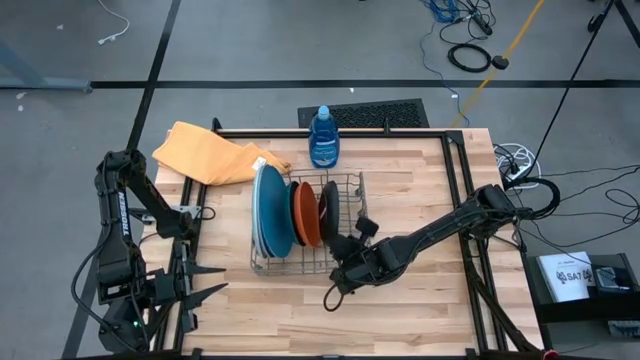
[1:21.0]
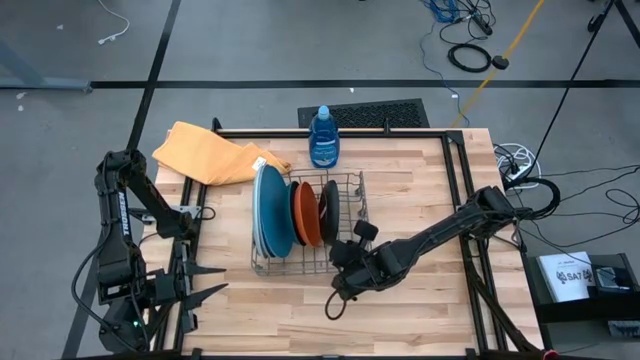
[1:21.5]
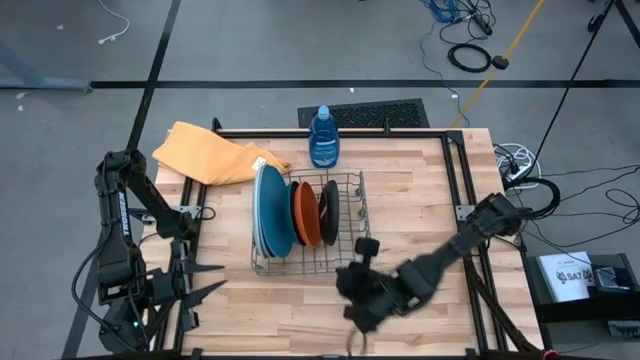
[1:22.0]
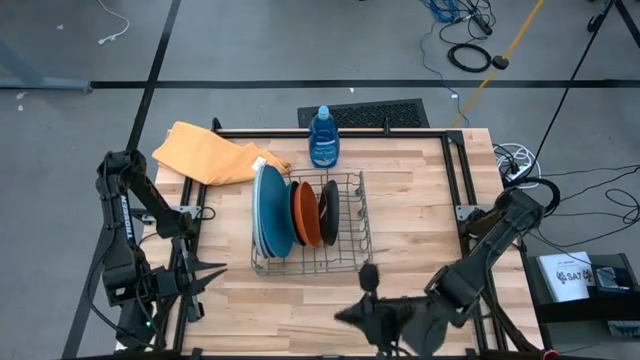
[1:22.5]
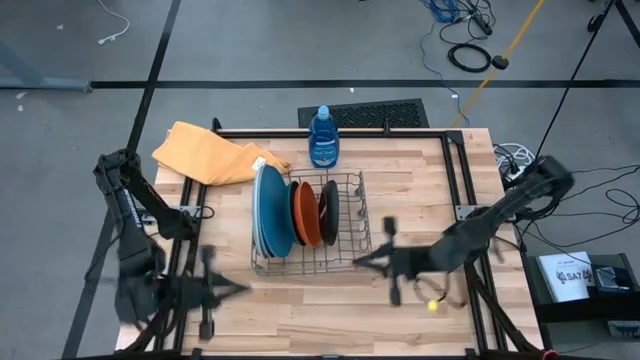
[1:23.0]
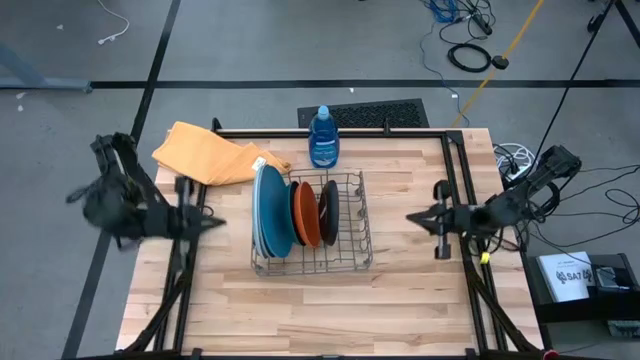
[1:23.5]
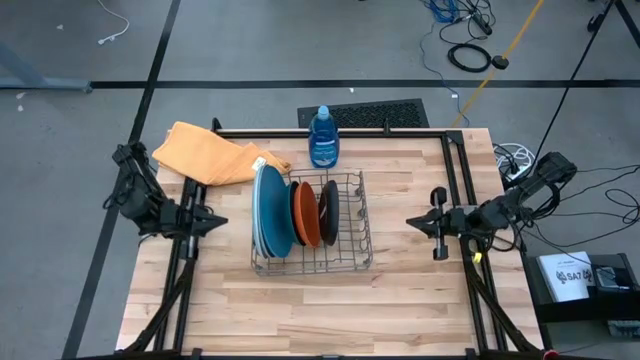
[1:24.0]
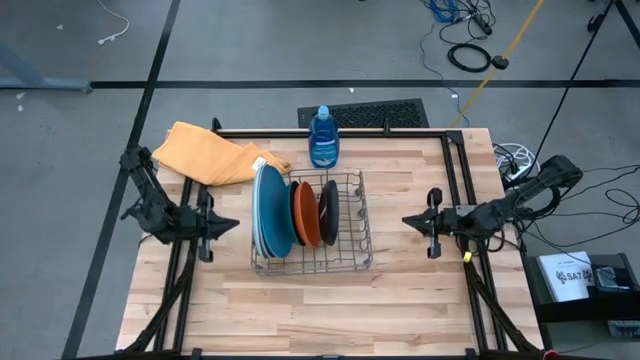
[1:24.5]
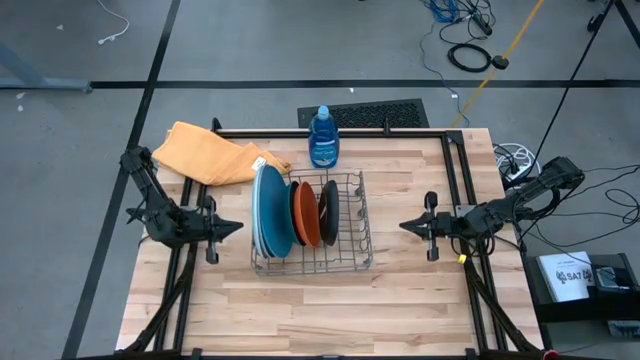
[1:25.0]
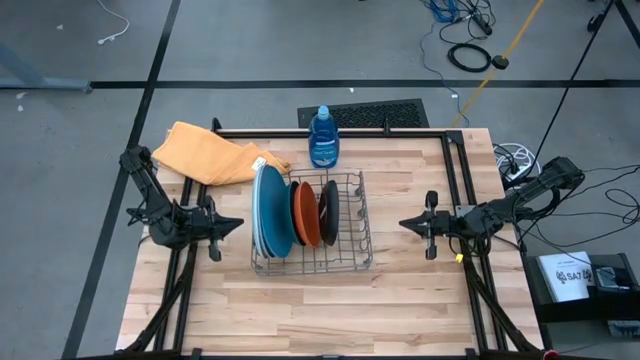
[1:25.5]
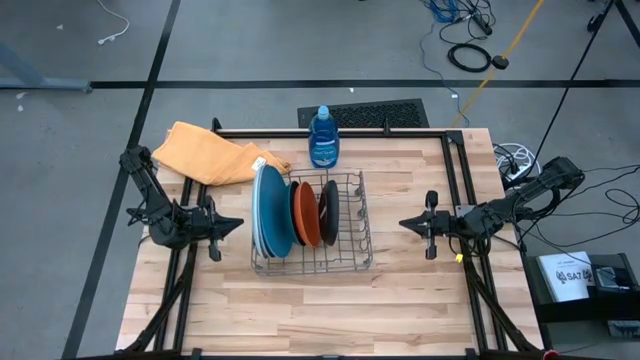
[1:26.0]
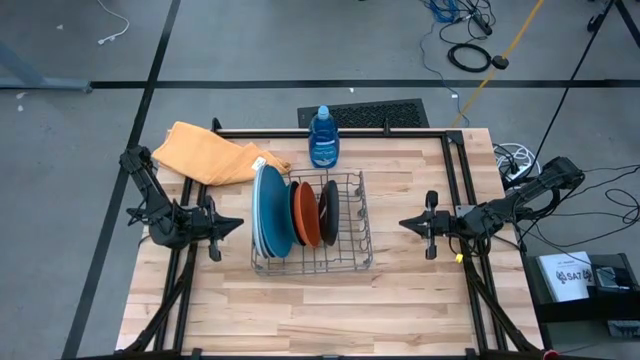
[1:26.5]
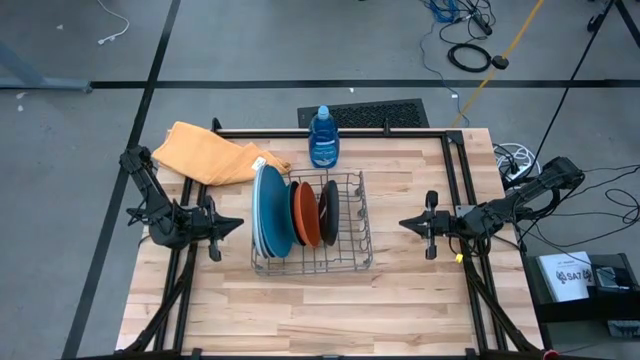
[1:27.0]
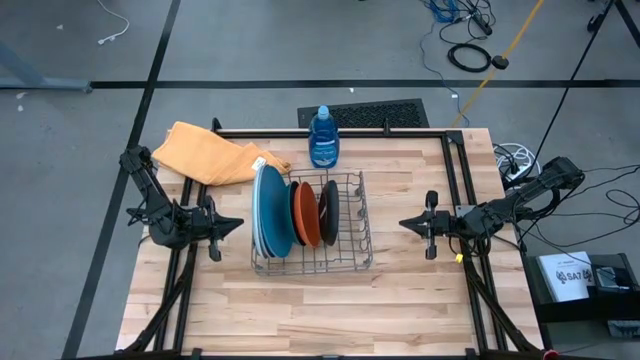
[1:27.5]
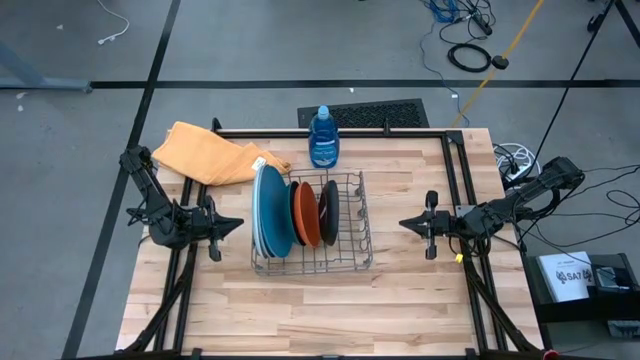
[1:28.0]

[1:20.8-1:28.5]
Task: Sort dishes
Return to Home Position

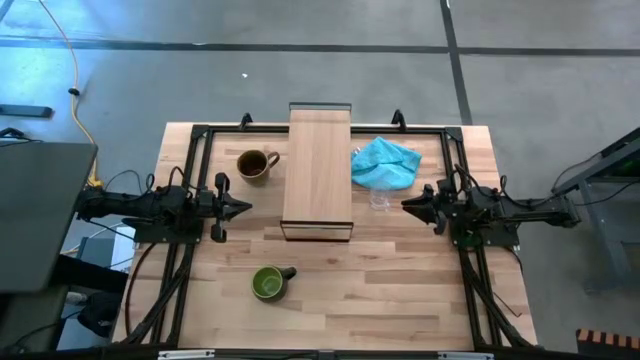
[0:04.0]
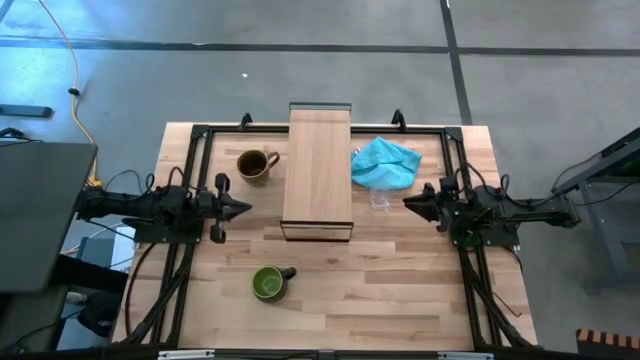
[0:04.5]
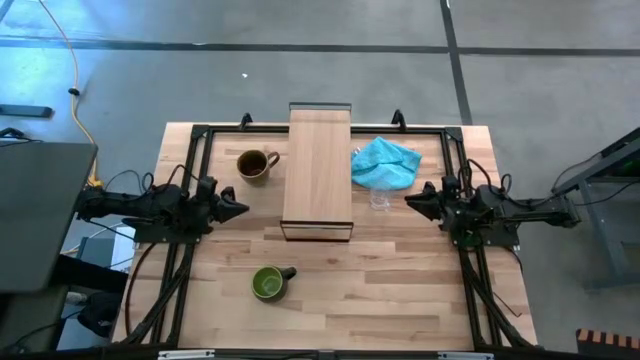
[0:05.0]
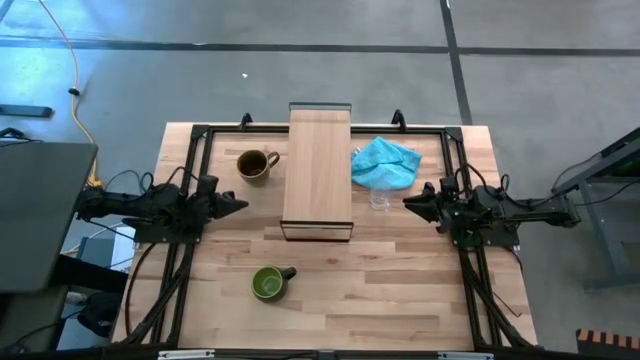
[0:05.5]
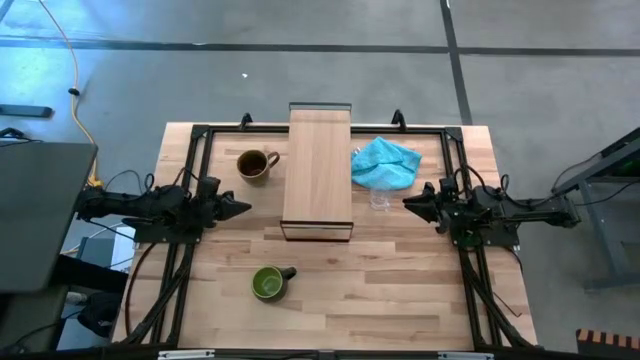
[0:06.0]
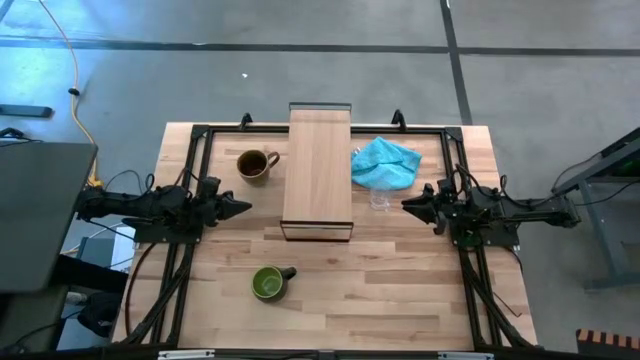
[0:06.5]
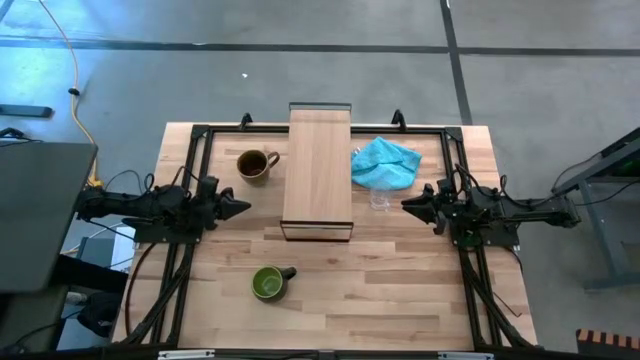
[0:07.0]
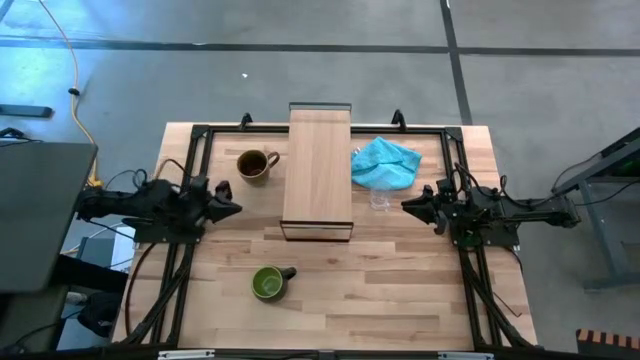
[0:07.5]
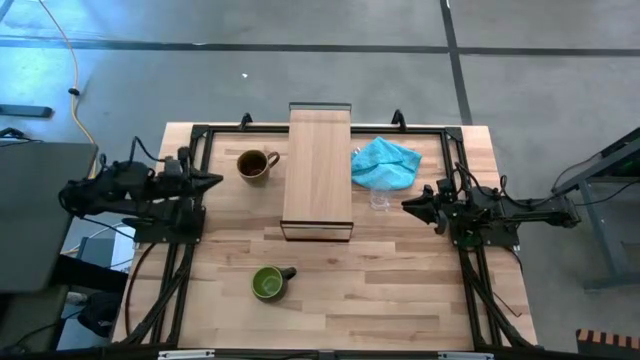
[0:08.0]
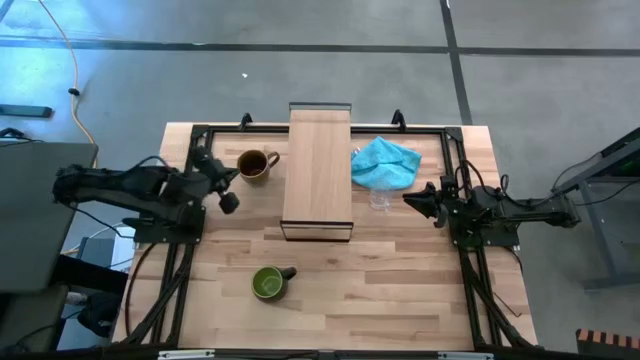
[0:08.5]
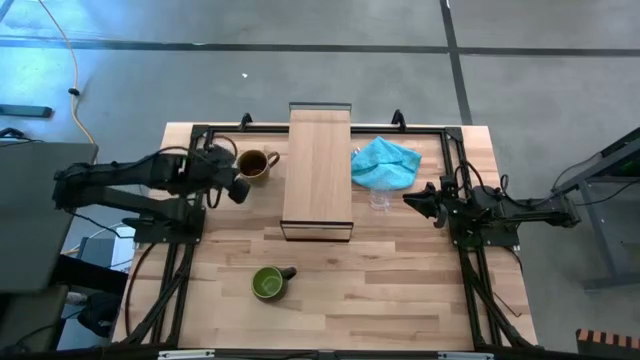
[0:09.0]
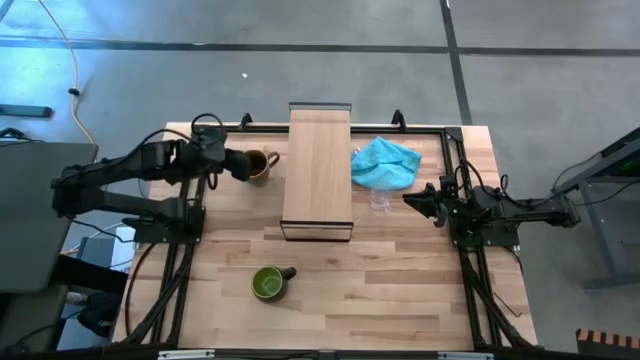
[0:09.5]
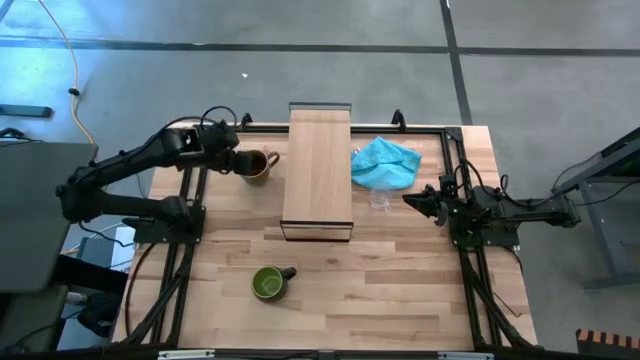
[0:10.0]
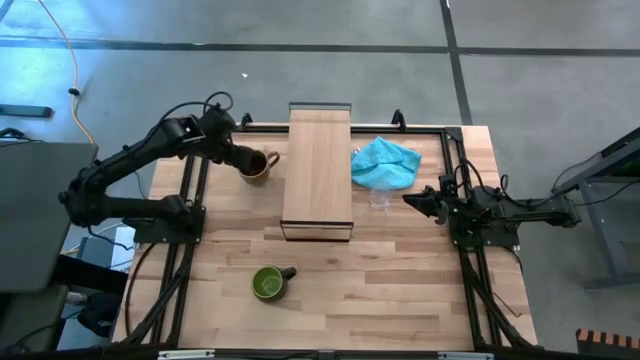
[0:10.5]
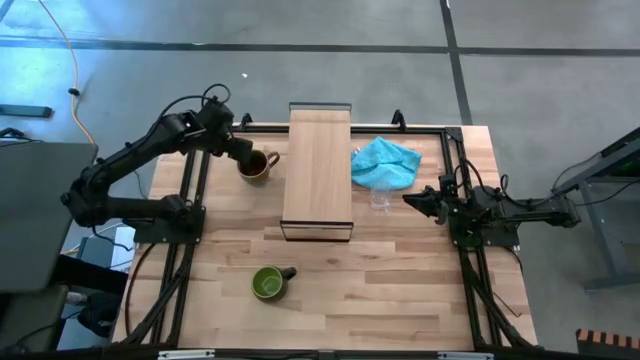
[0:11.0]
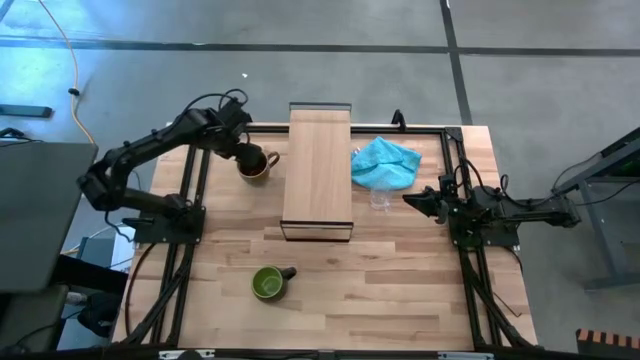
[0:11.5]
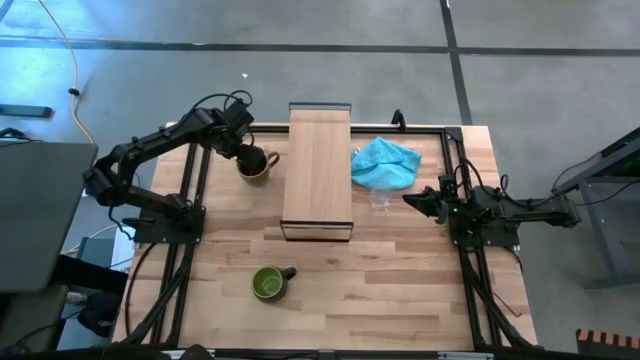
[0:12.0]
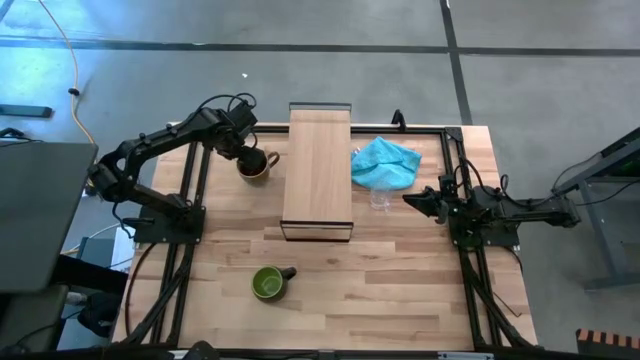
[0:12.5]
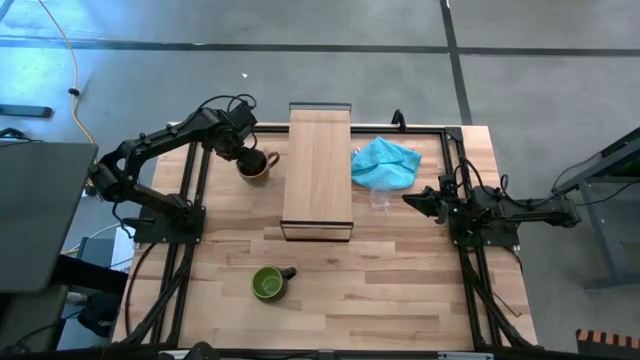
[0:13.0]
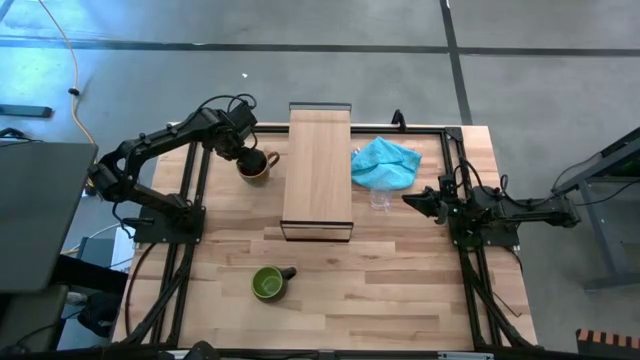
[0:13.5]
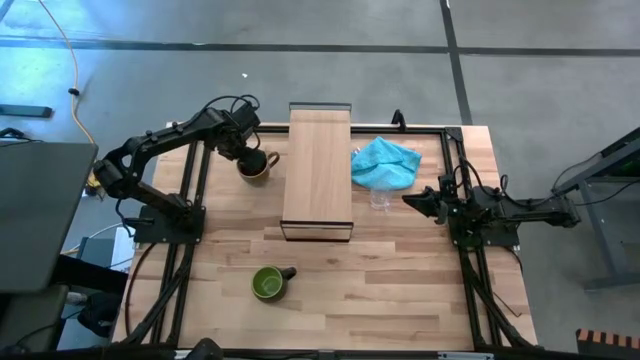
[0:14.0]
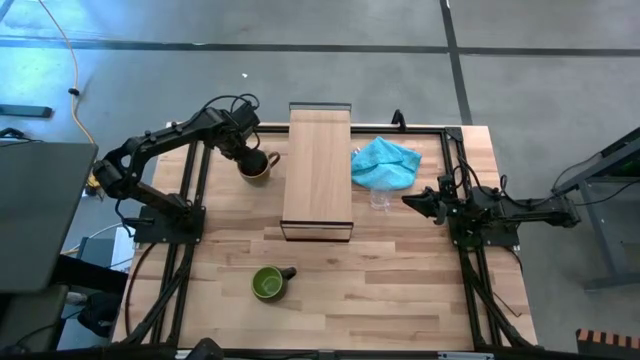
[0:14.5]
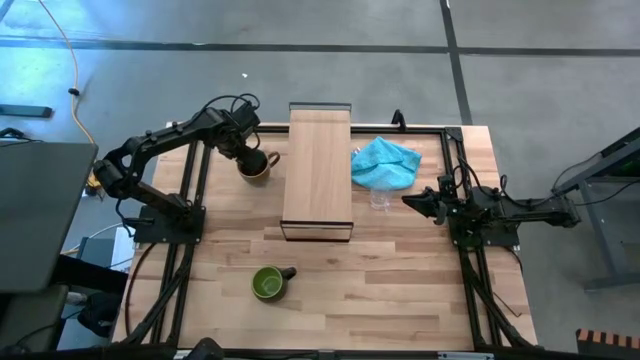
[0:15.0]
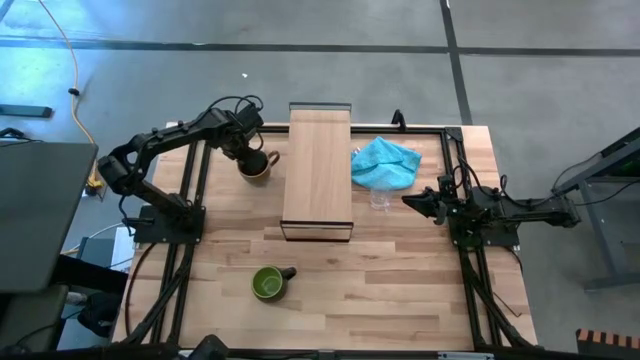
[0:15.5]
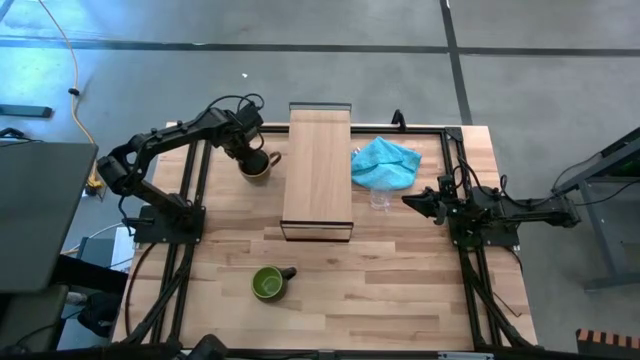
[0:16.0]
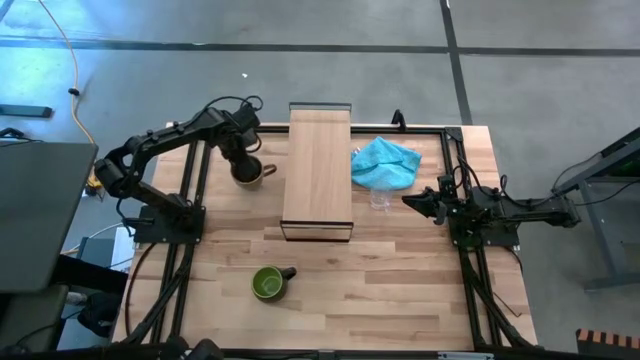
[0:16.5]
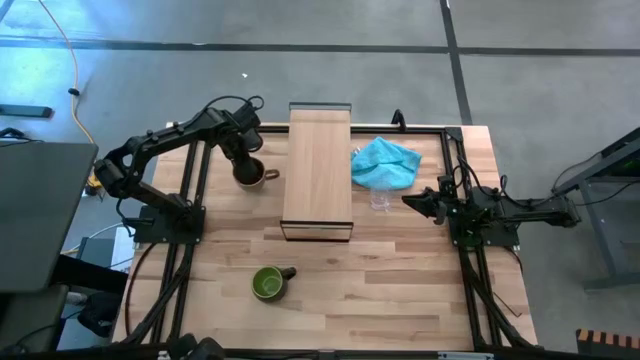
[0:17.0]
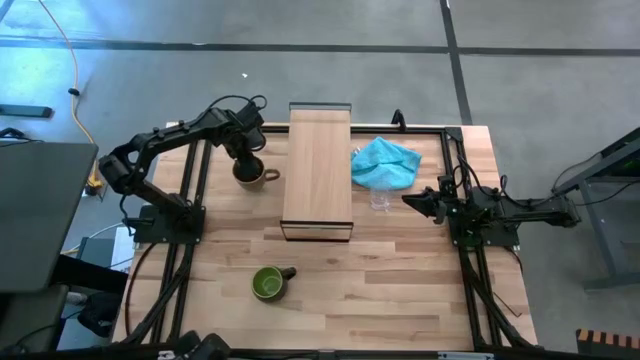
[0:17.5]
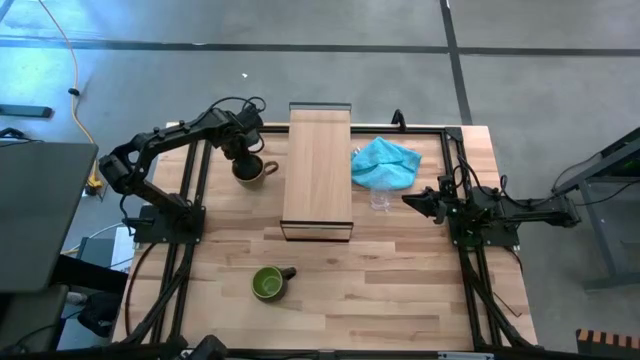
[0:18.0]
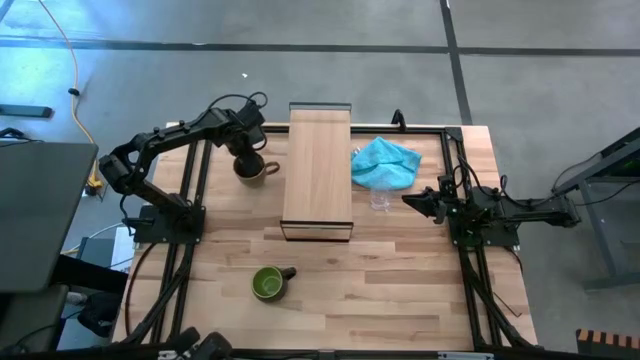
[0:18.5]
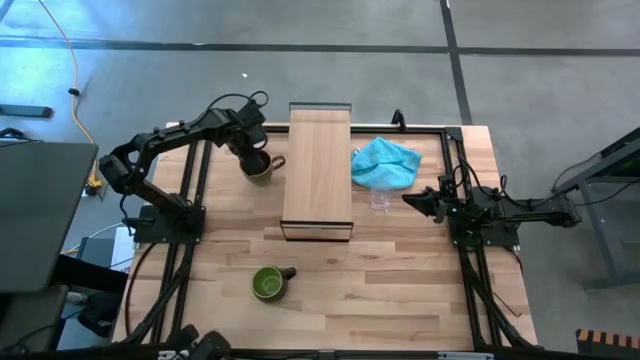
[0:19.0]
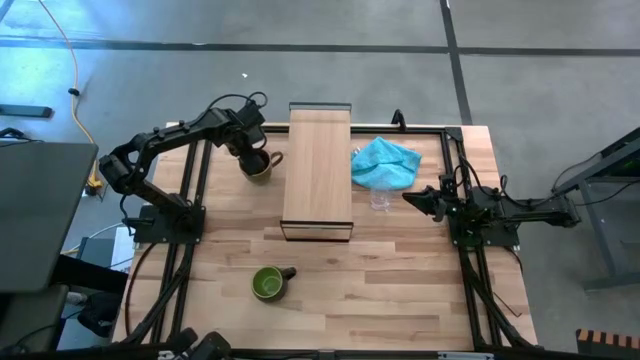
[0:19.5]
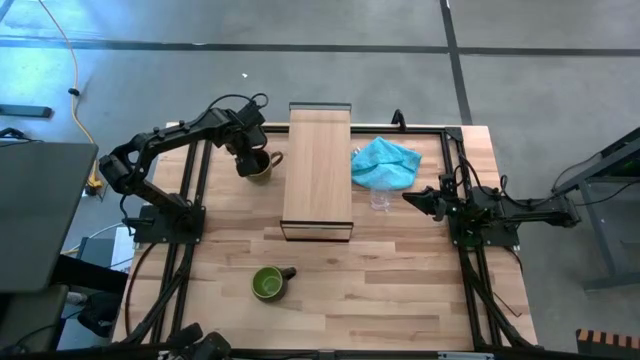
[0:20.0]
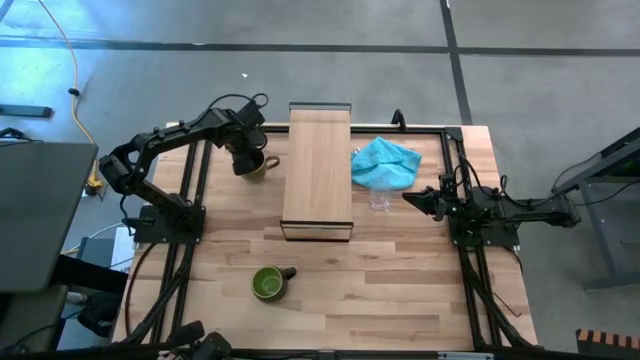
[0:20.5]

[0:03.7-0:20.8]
Task: Stack small to large cups/mugs on shelf
Put the brown and green mug on the shelf
